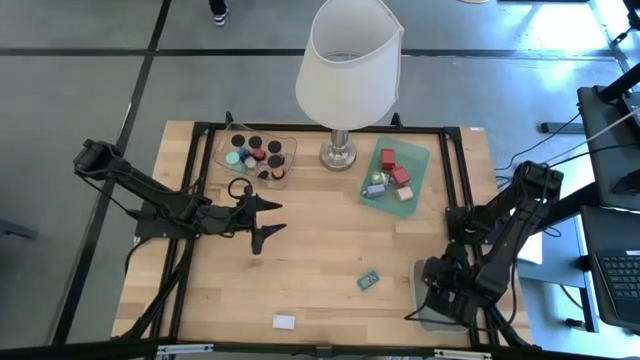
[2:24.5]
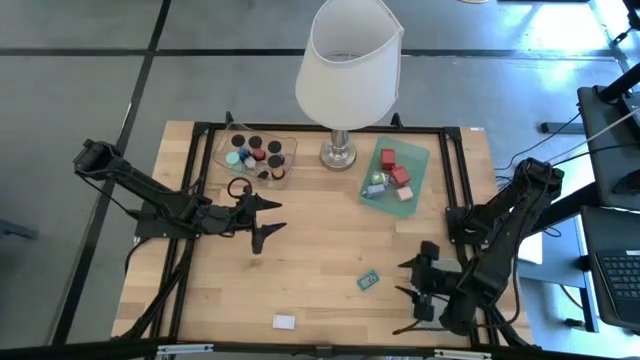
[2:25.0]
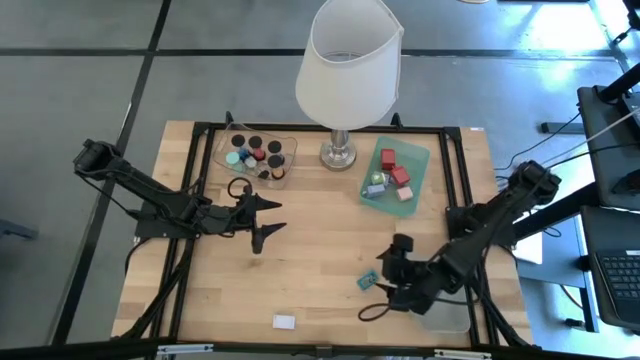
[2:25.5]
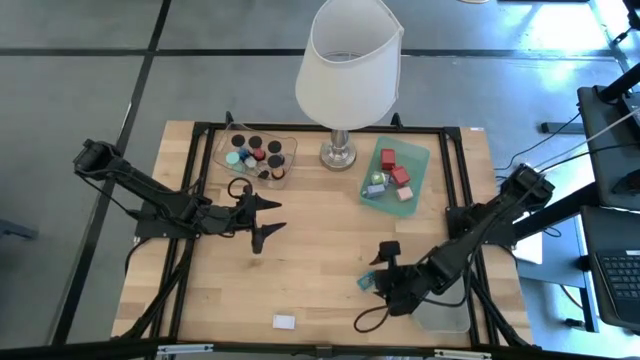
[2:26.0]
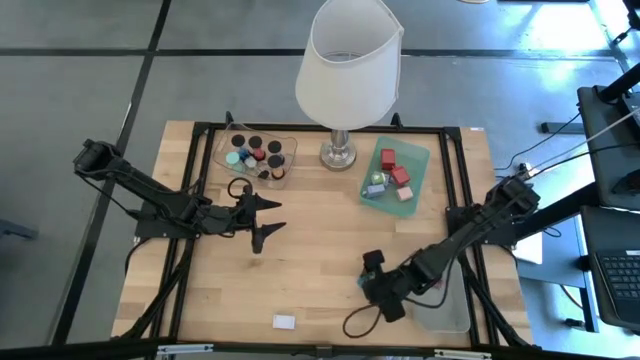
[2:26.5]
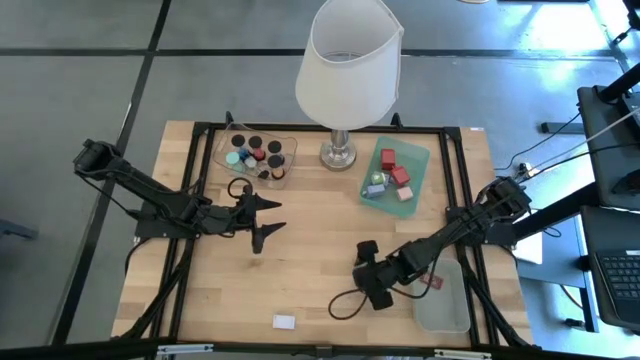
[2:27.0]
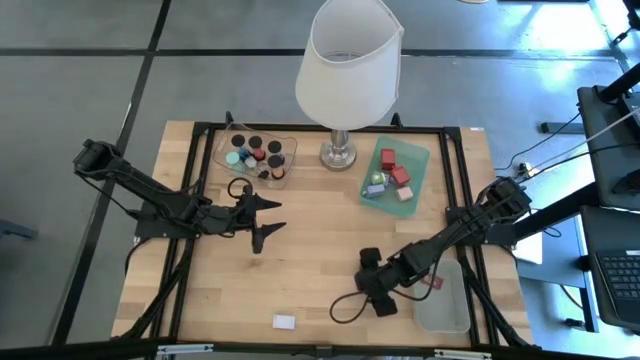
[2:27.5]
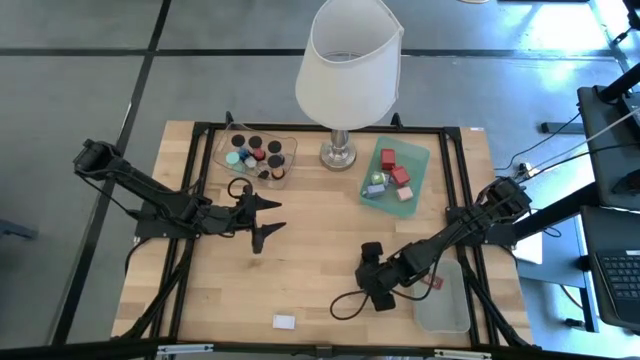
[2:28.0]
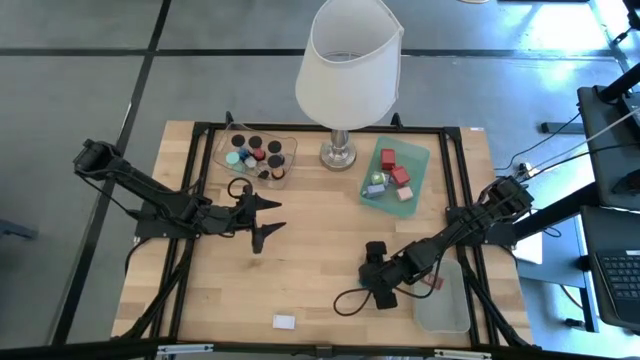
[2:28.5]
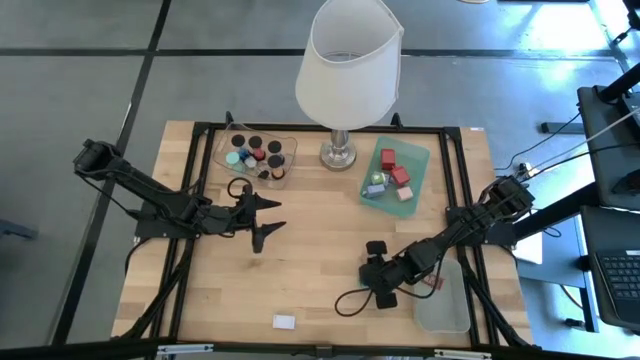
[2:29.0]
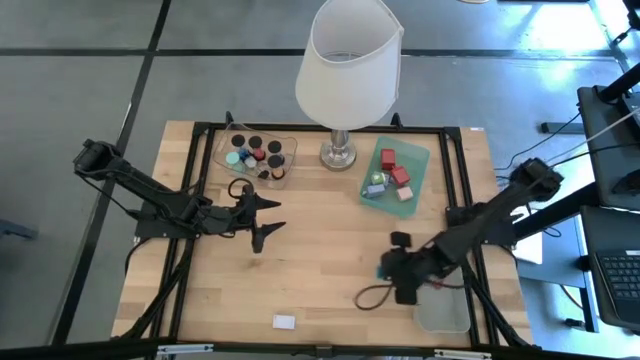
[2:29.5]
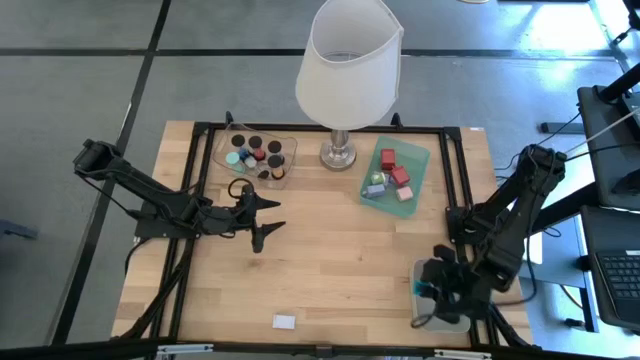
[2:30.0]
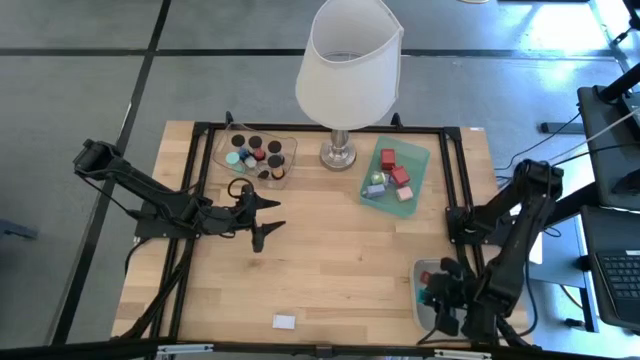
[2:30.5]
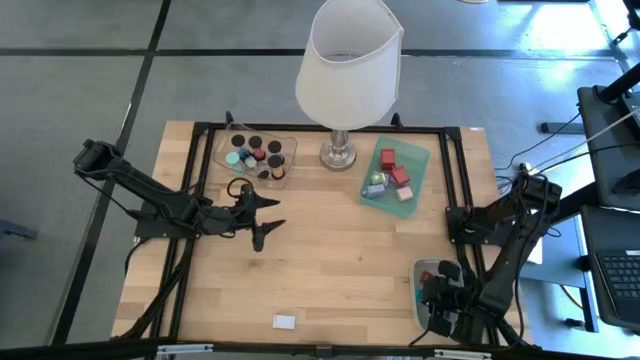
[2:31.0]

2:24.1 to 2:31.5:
Task: Pick & Place Office items
Put the blue digital timer into the gray bin

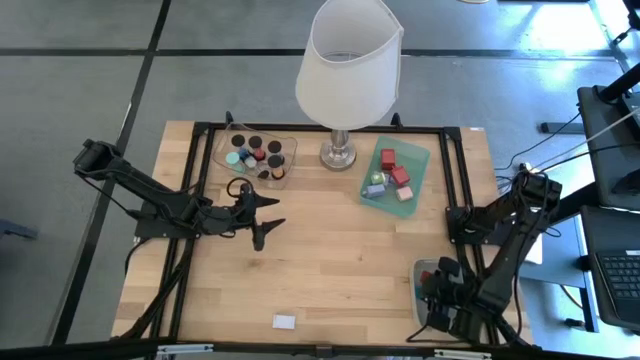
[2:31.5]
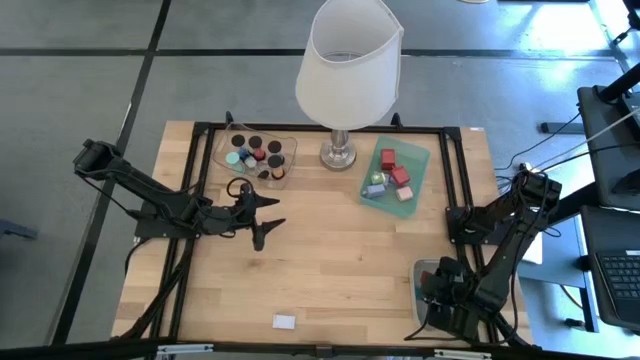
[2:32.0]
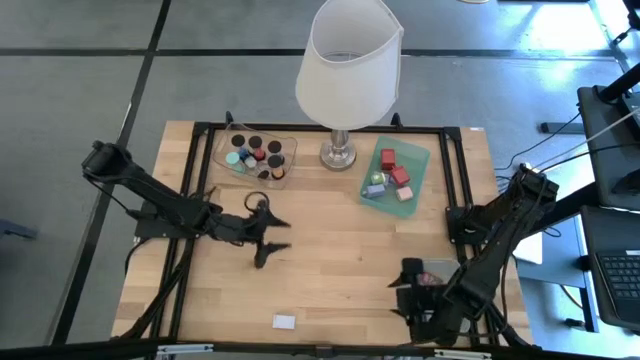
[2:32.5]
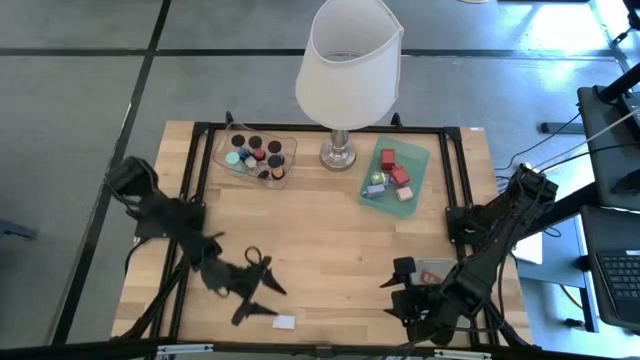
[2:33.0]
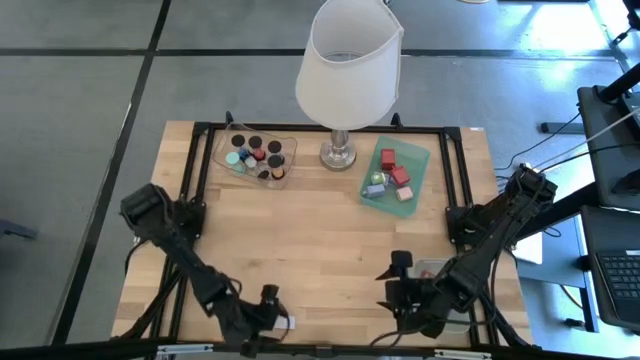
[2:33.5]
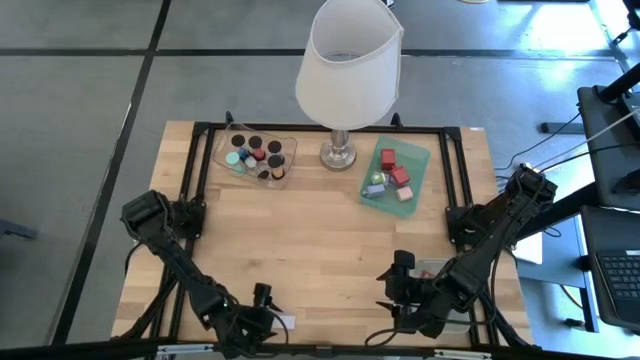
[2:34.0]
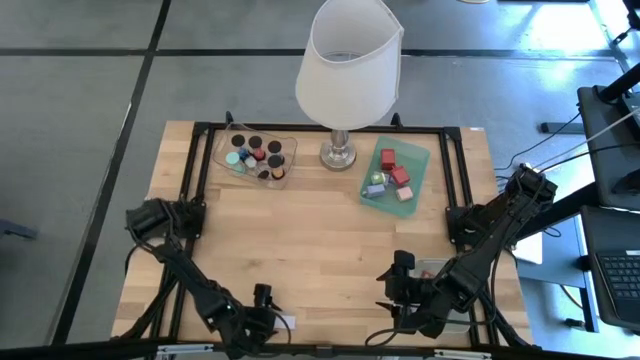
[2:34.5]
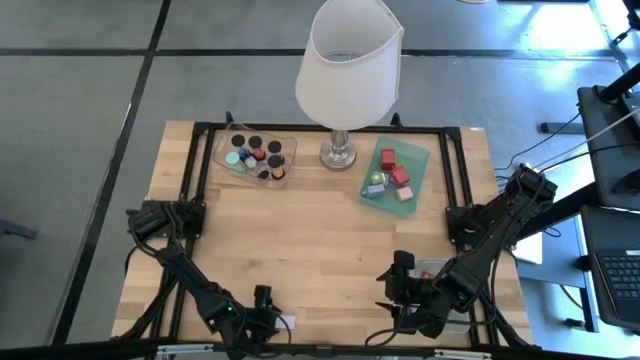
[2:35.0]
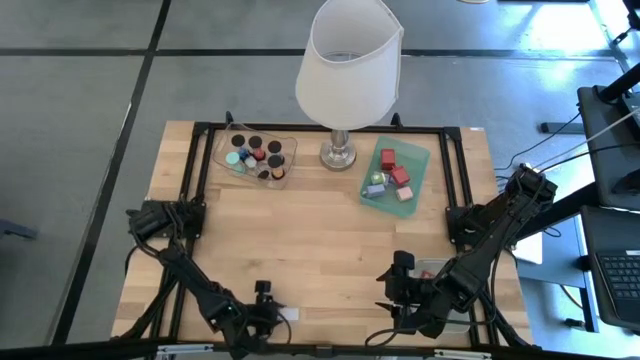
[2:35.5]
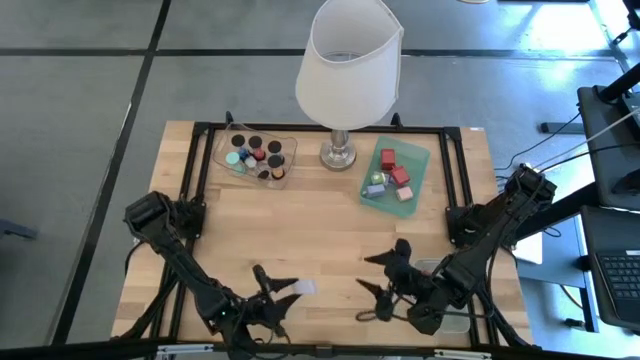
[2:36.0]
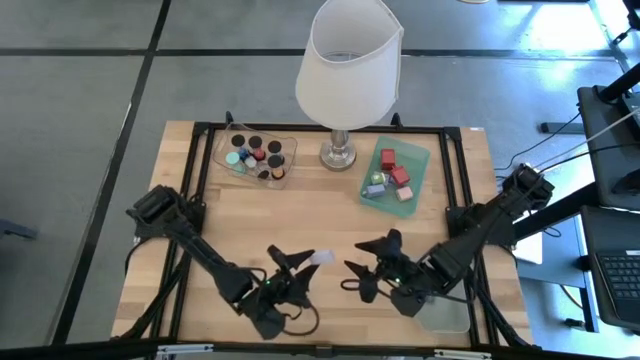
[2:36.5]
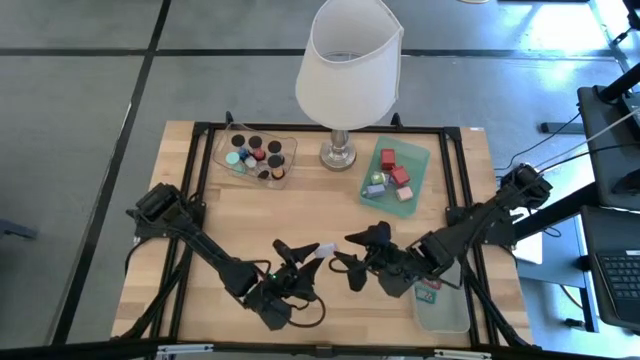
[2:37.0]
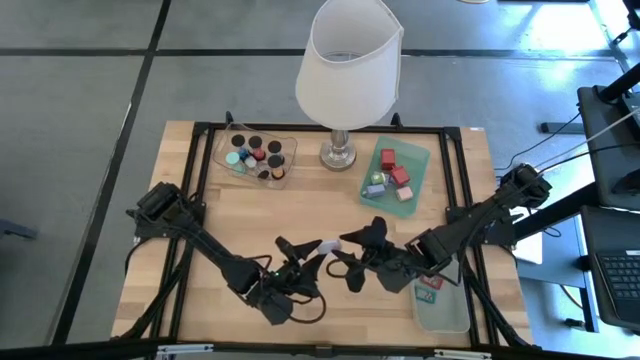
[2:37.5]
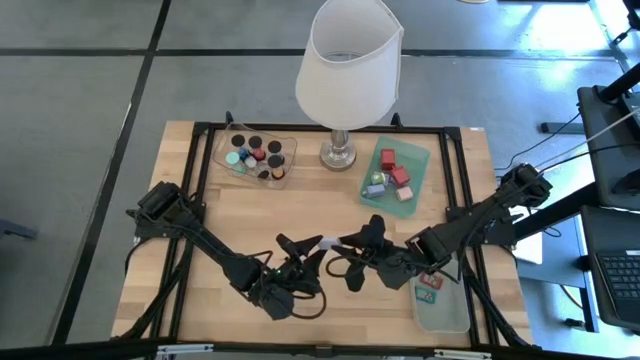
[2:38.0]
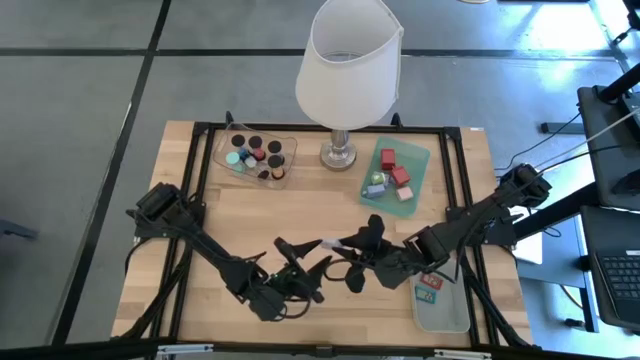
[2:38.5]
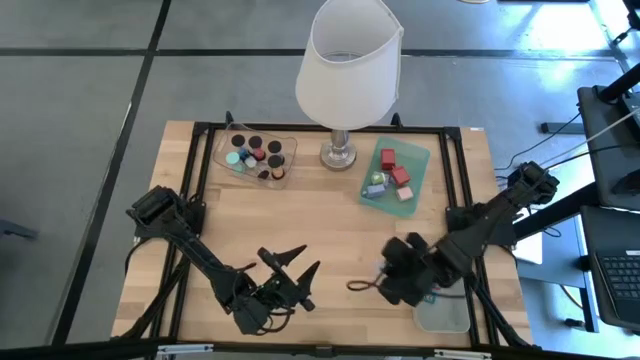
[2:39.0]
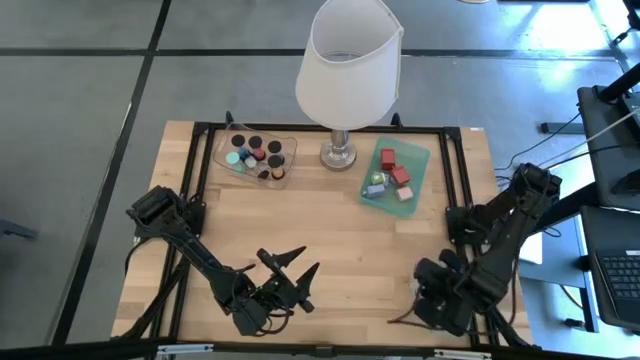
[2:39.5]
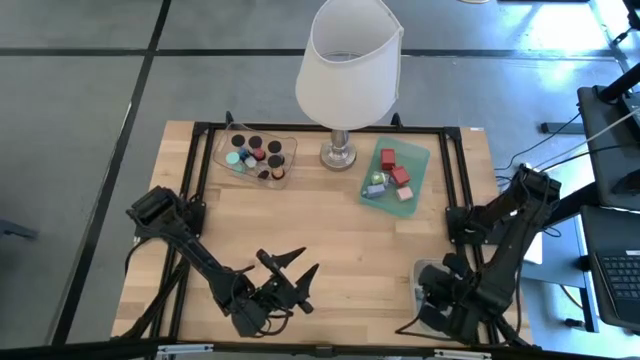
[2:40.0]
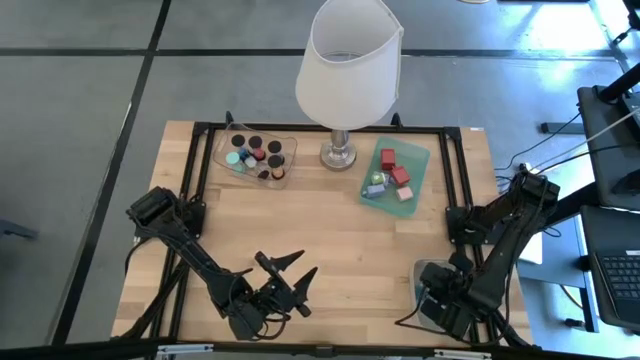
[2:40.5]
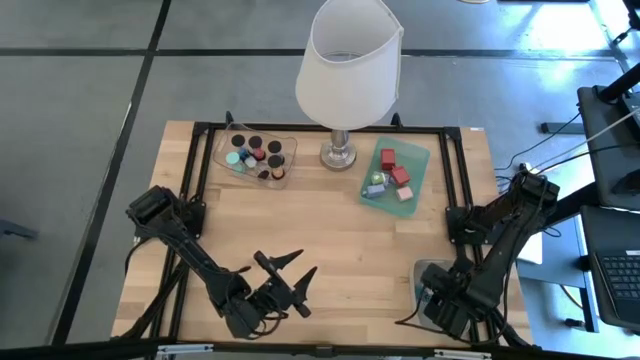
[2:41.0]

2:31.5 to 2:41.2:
Put the white digital timer into the gray bin

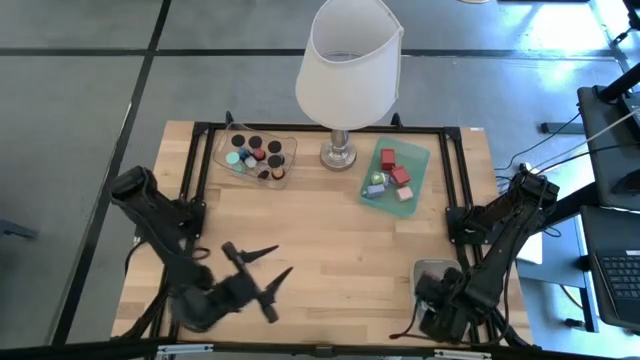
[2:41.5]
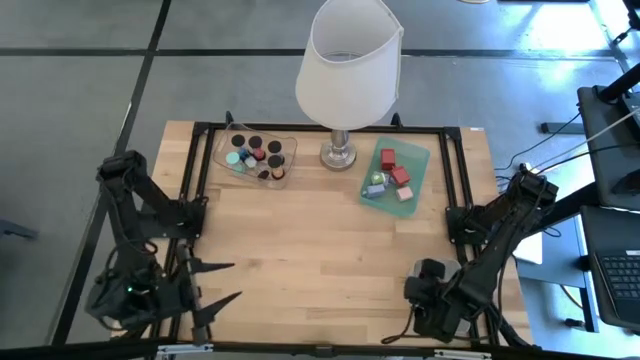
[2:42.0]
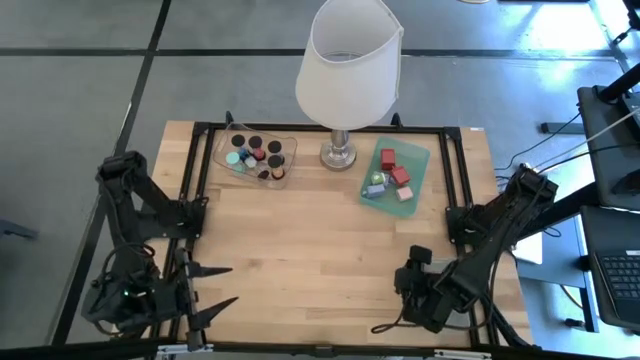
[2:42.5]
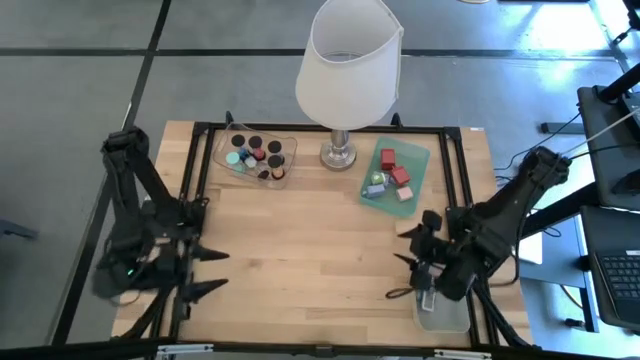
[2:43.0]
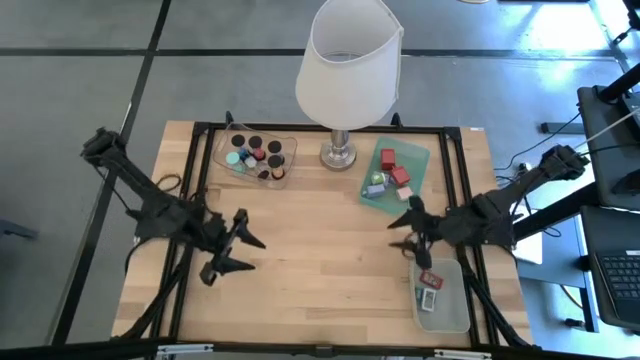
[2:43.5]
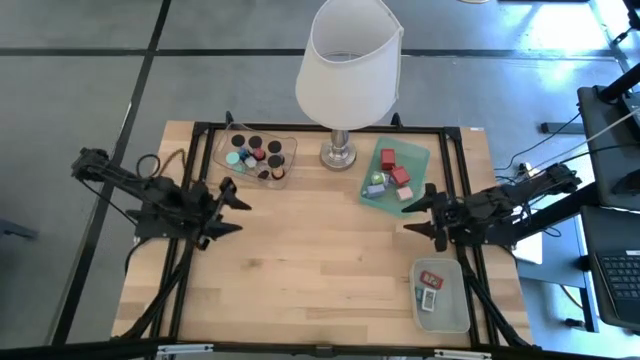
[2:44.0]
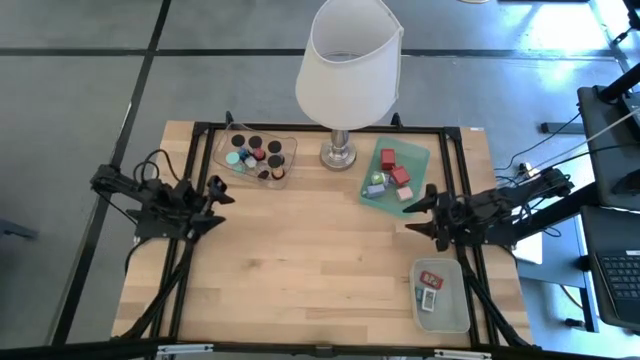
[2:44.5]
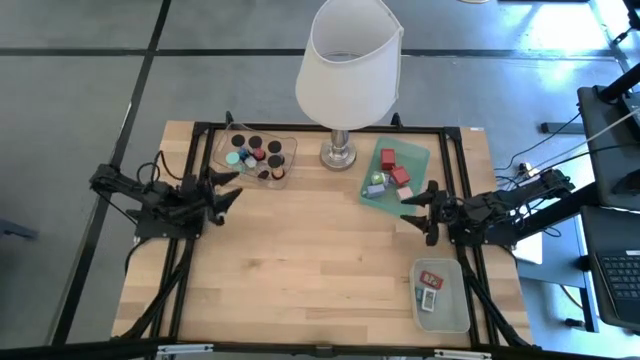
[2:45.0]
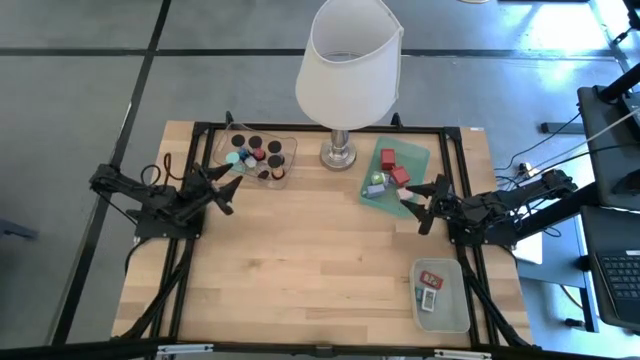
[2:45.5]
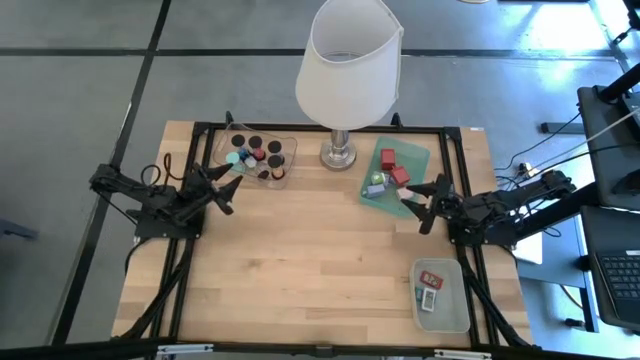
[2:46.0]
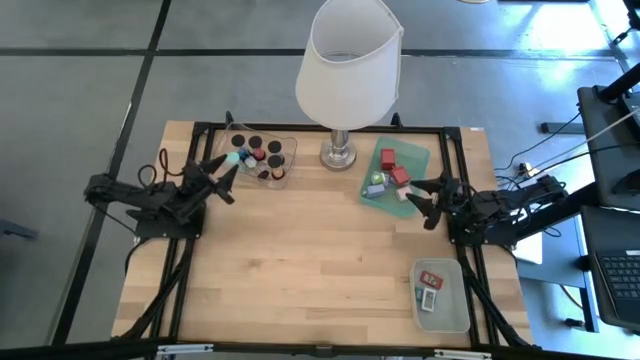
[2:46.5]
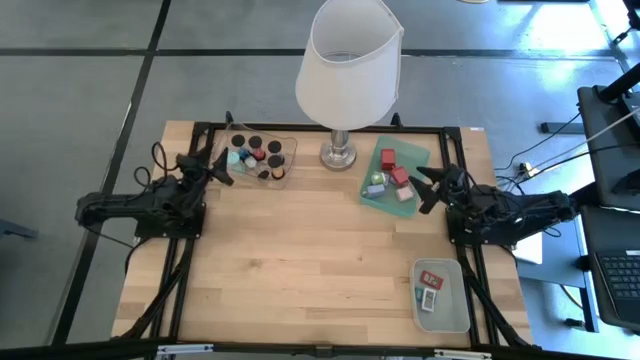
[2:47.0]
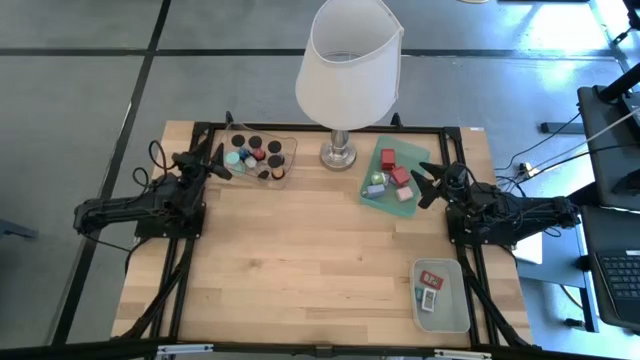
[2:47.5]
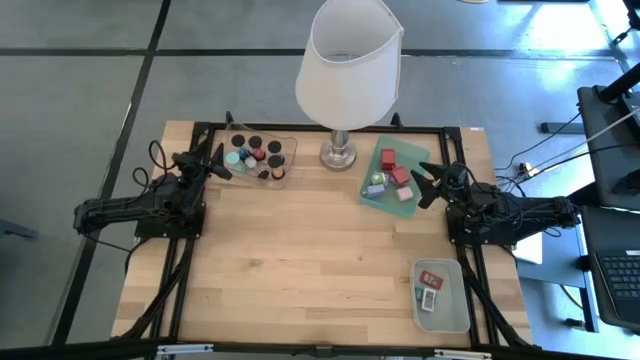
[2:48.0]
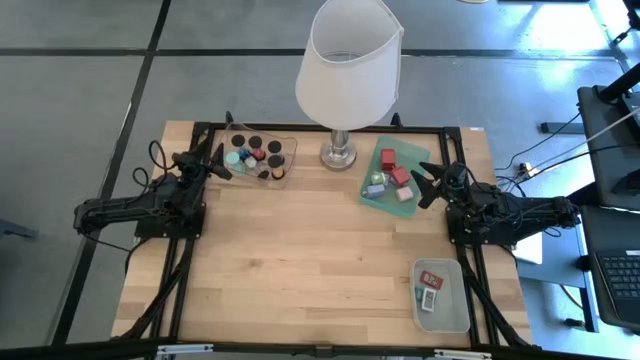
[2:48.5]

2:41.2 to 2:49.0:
Return to Home Position
